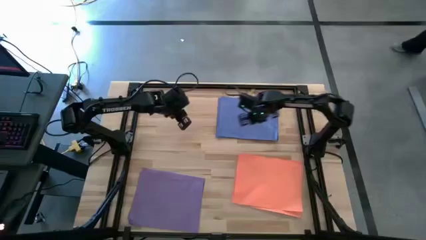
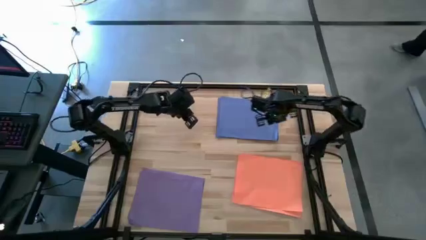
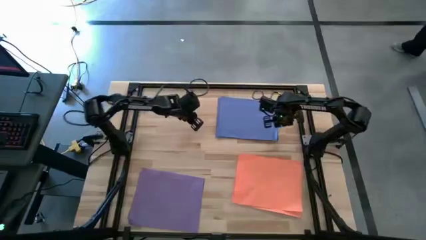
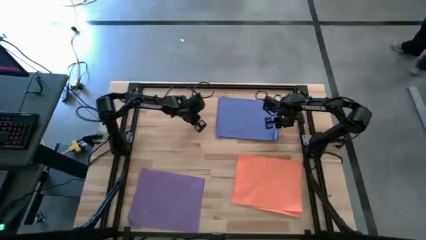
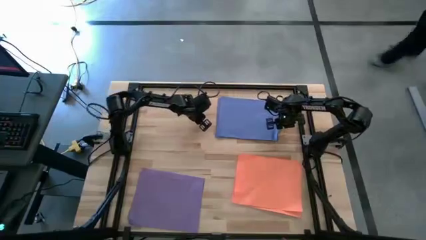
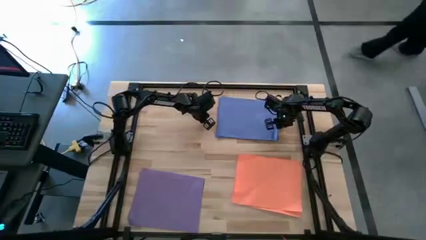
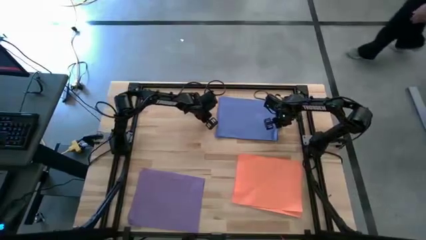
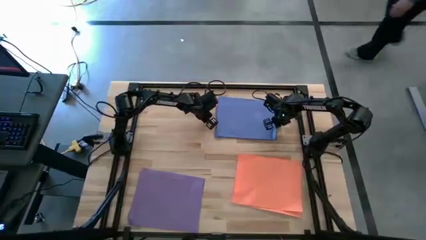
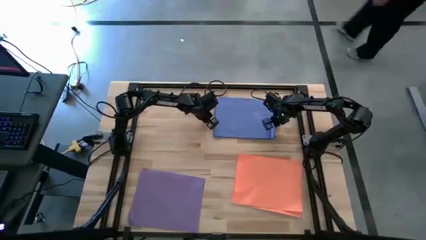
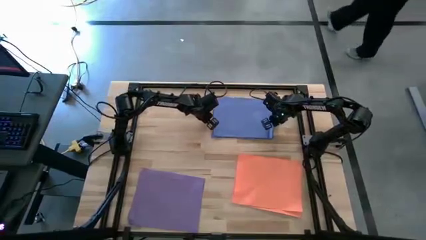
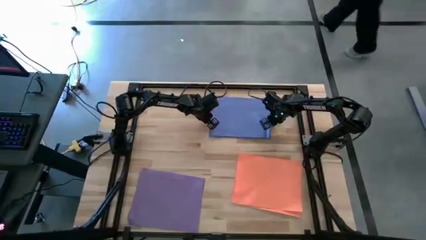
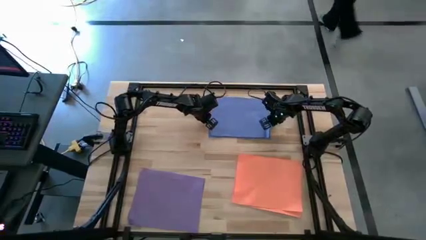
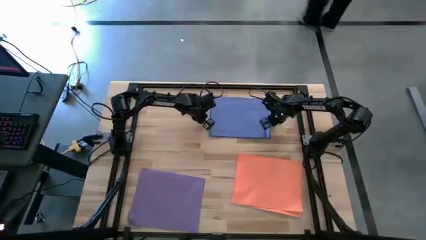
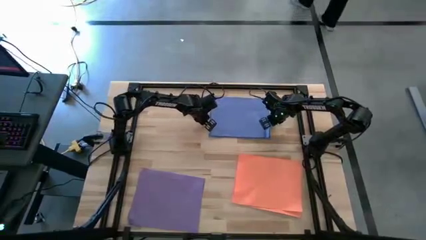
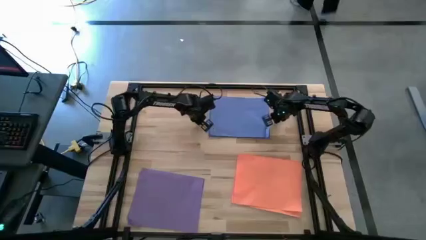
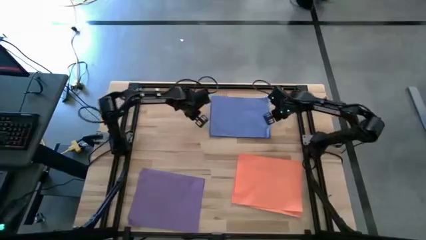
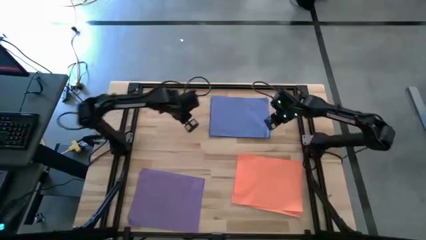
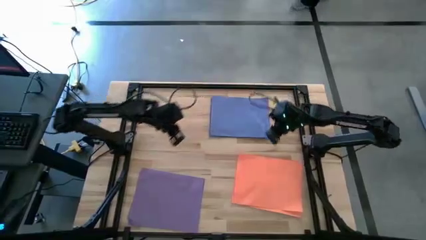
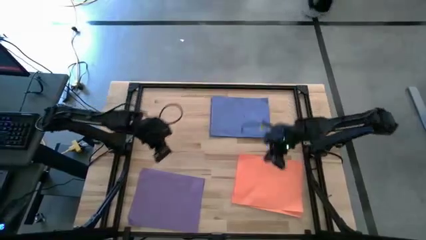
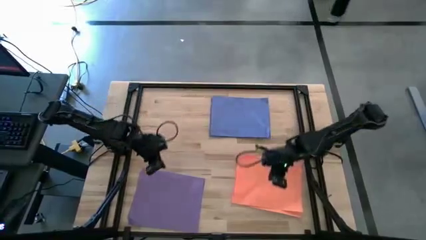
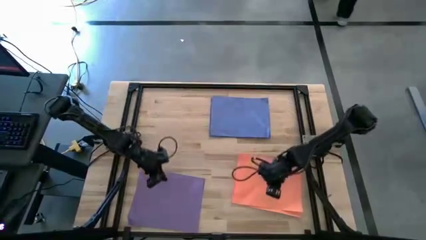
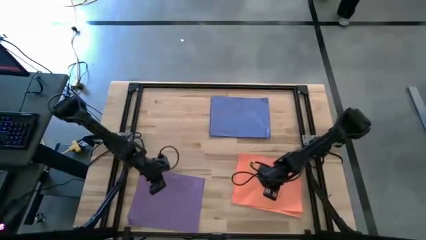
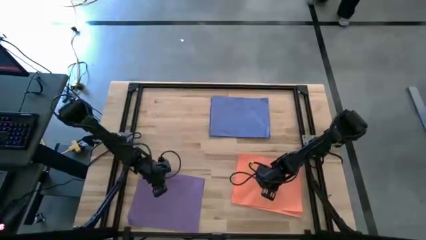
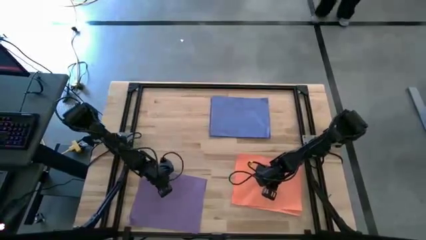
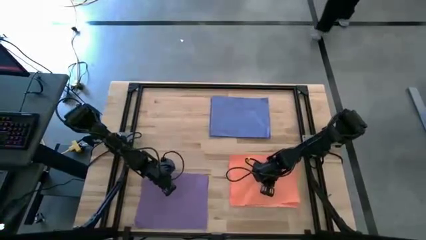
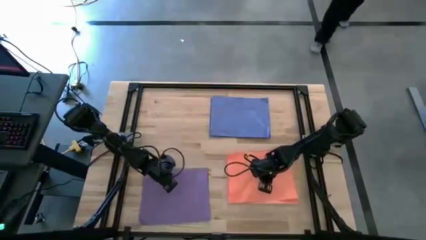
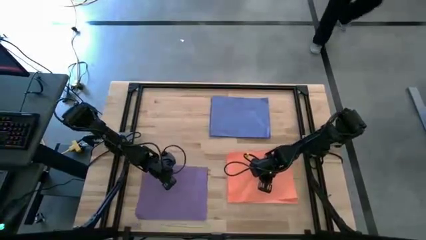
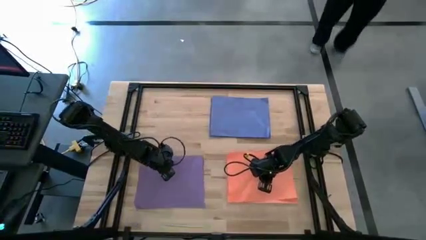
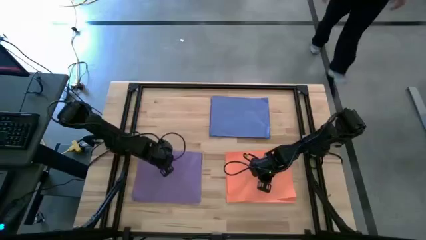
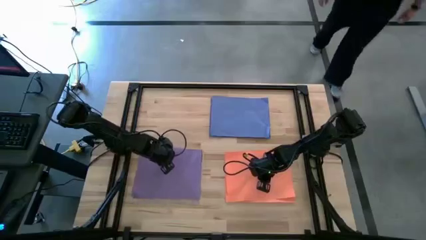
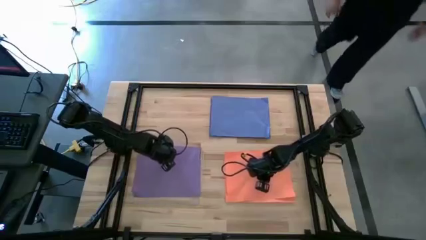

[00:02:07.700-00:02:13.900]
Task: Organize paper
Adjust the stacked colored papers

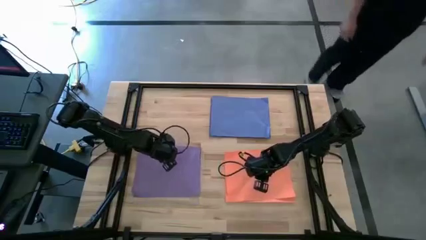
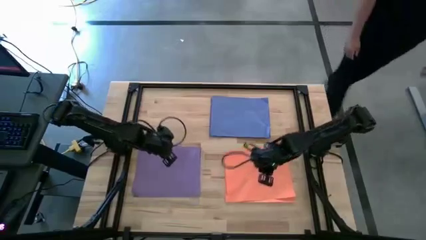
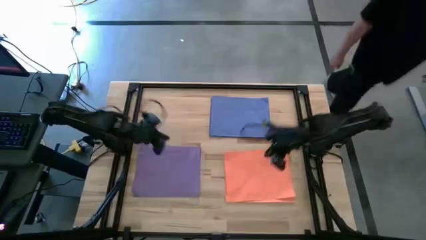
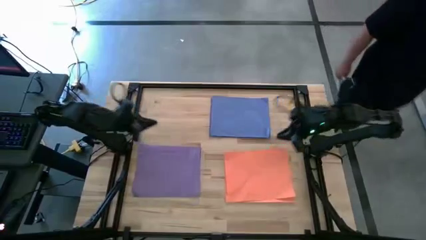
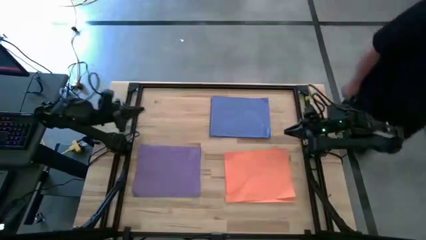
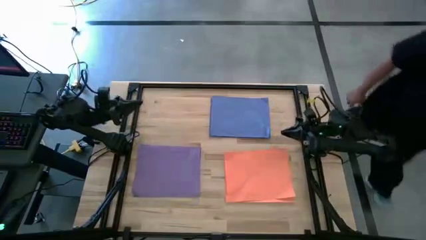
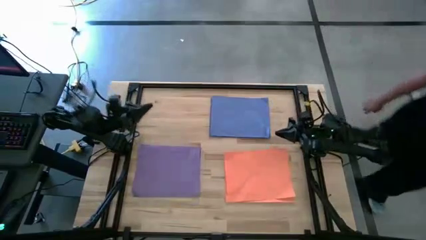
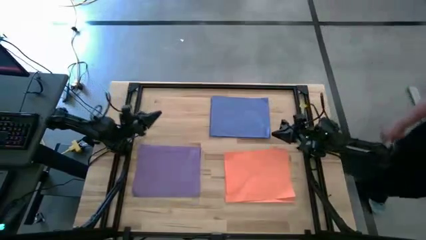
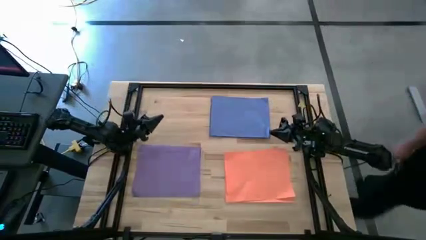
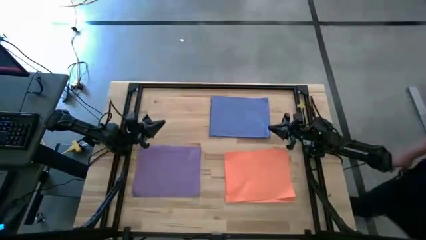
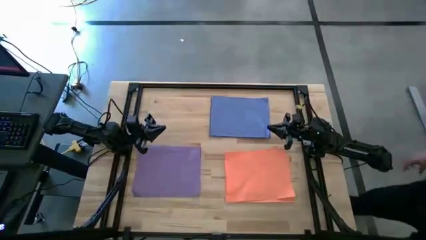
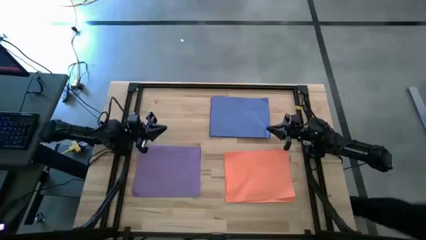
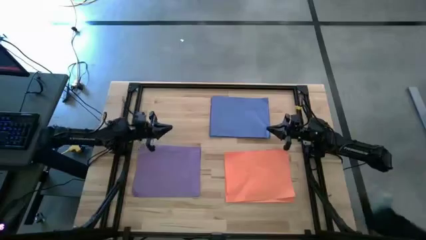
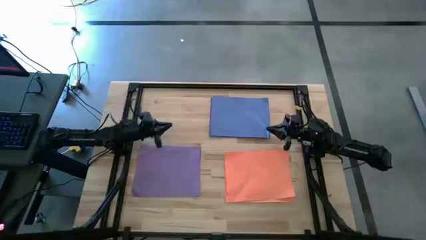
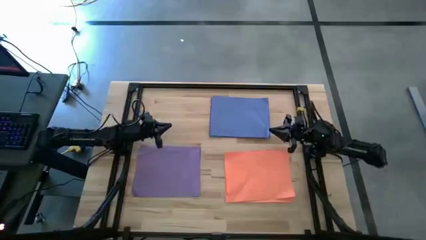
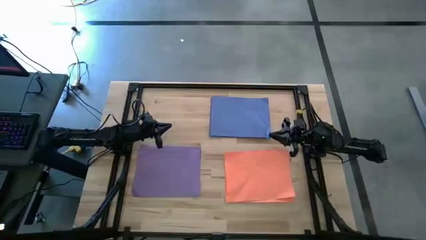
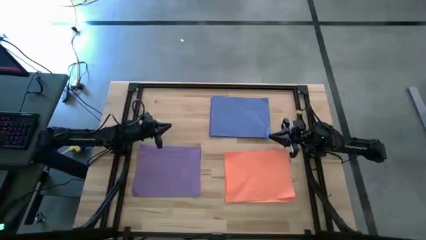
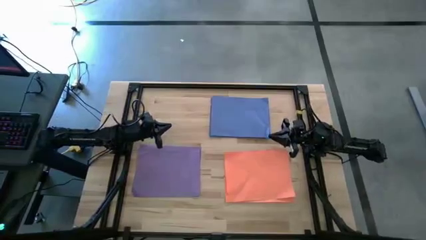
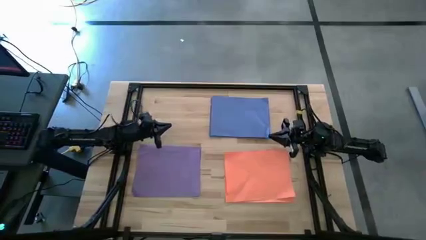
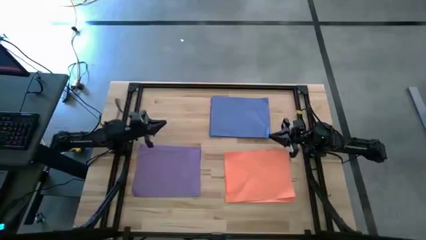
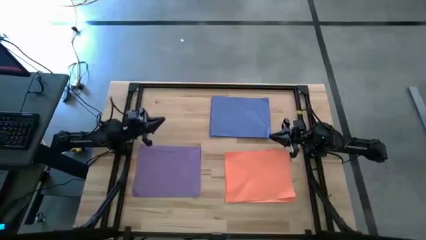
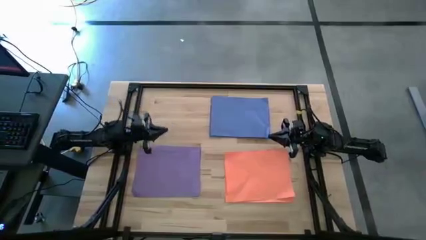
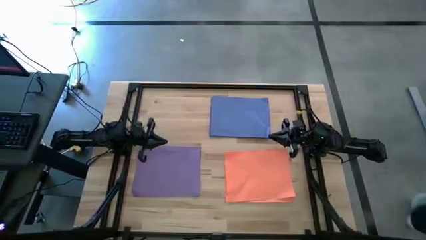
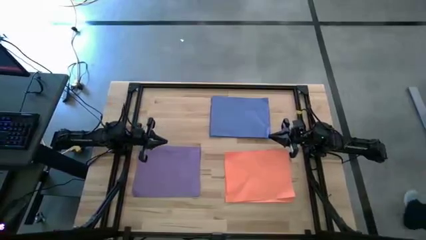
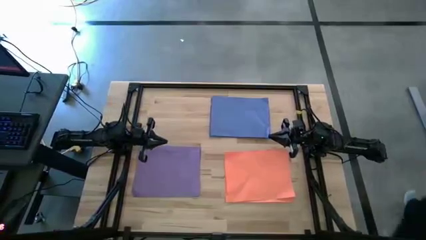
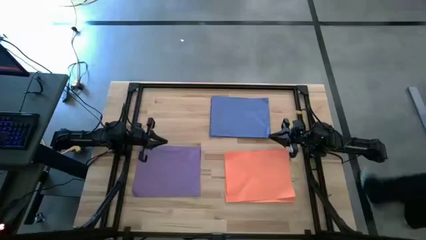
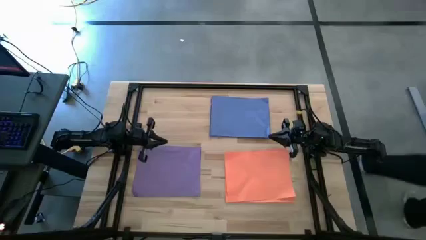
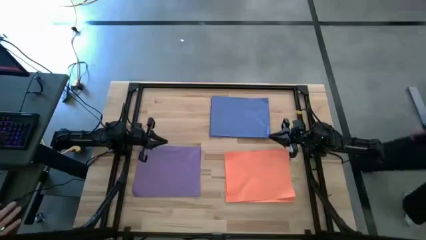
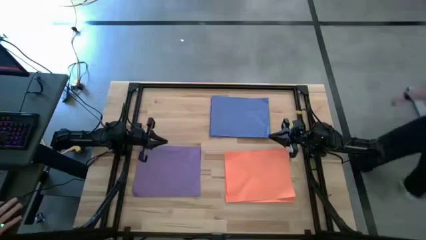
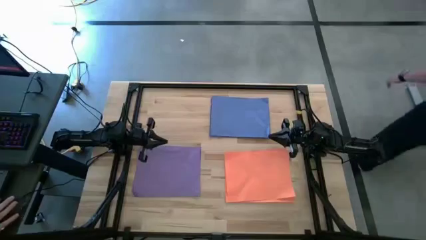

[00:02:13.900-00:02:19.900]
Return to Home Position

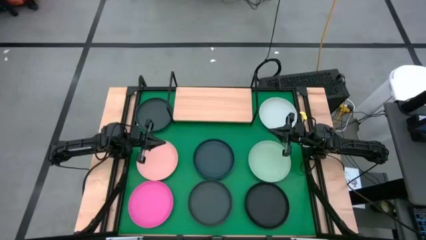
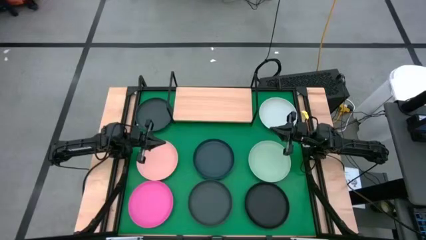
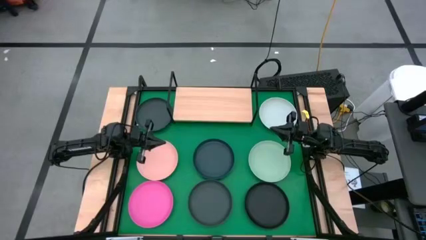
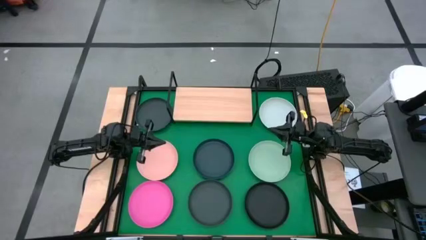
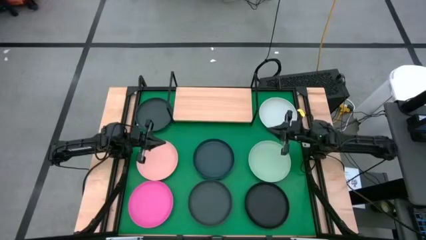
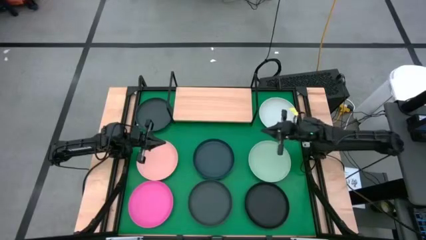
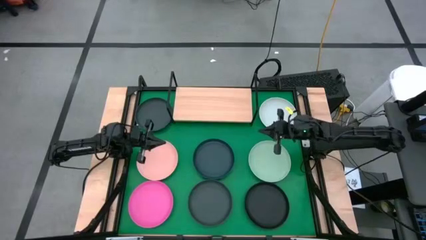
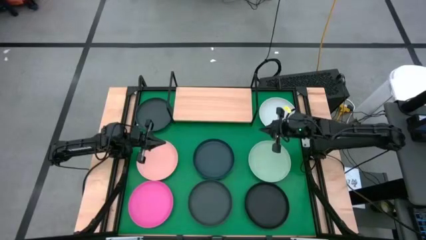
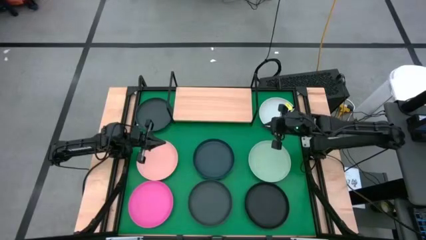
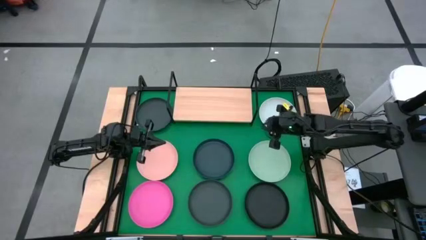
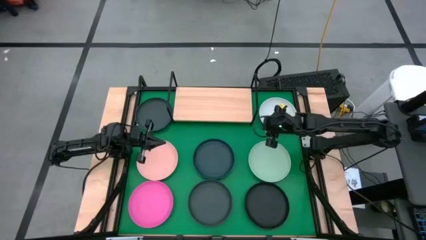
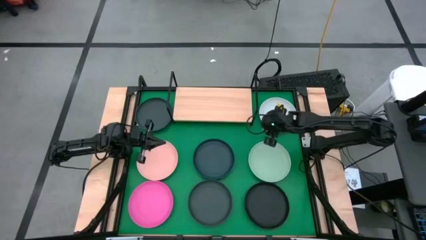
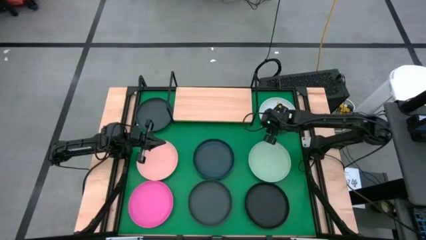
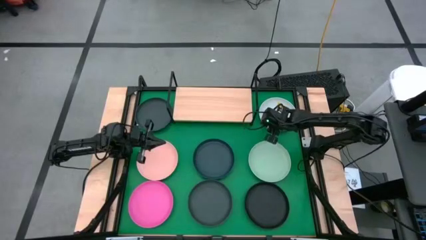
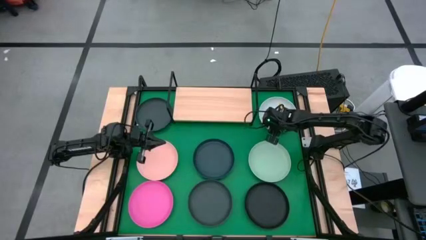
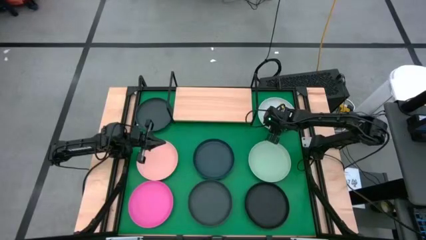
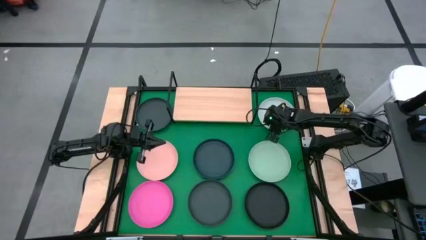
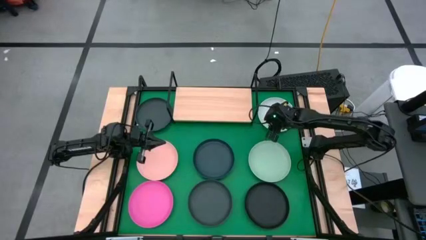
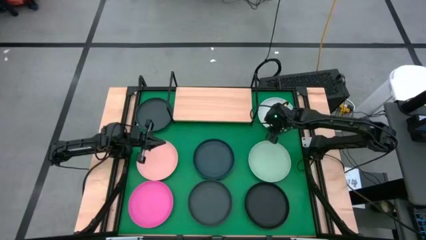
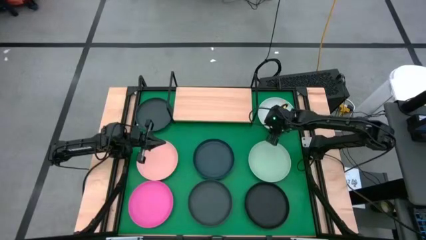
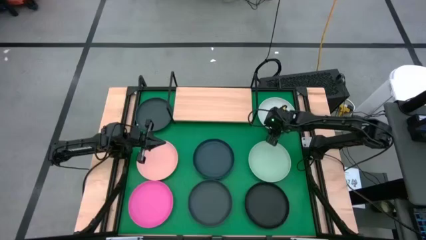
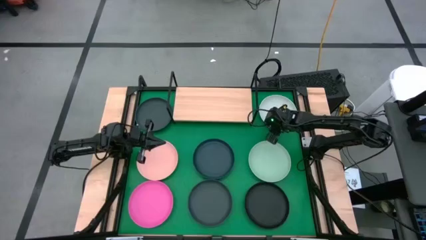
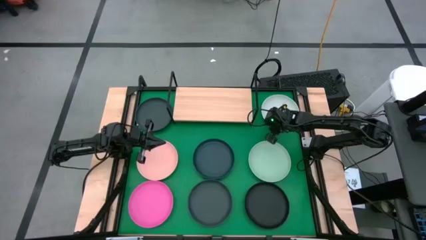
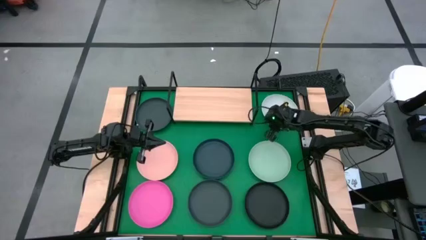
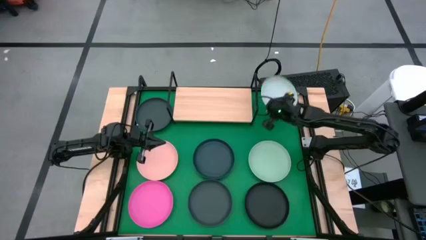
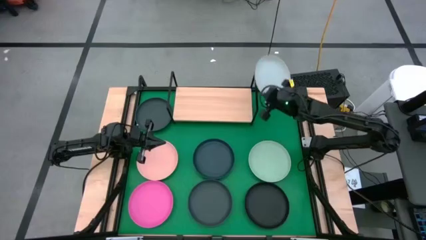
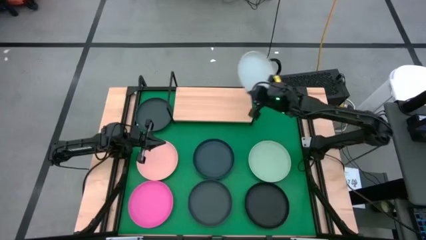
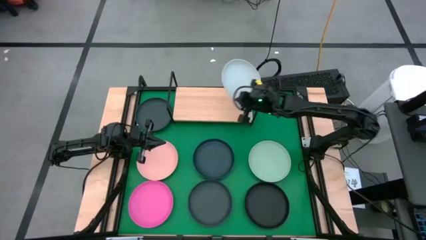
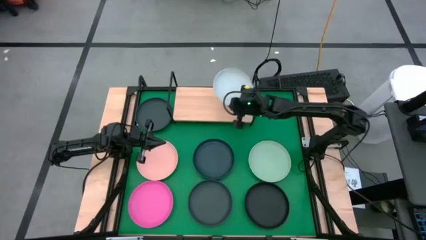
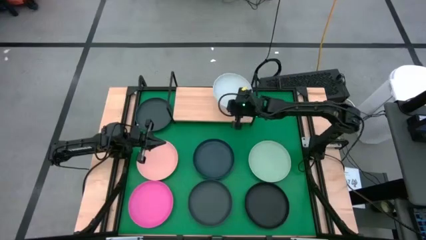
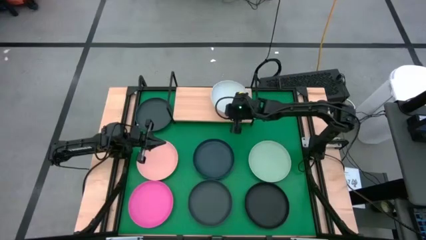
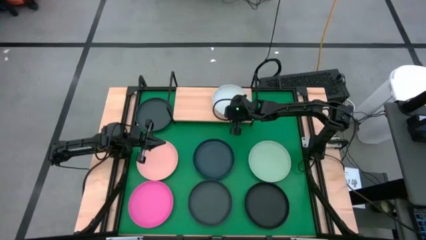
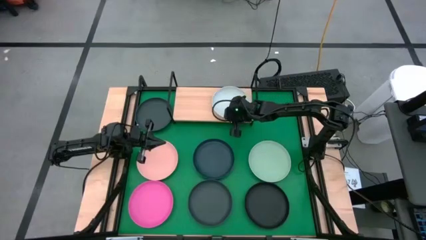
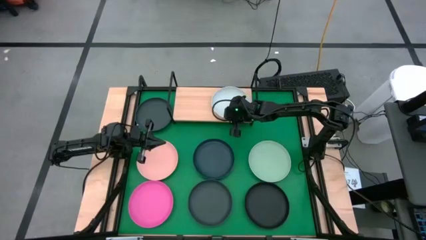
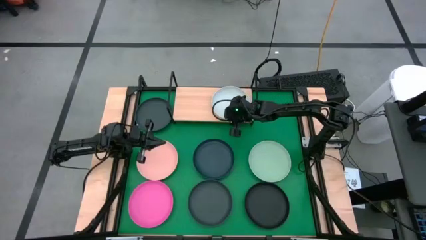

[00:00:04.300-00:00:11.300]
Task: Place and stack plates onto a shelf
Put the white plate on the shelf
